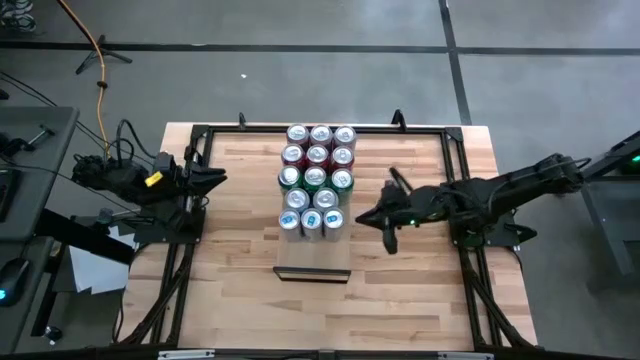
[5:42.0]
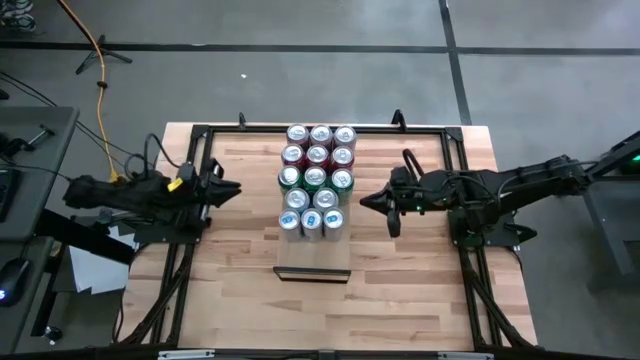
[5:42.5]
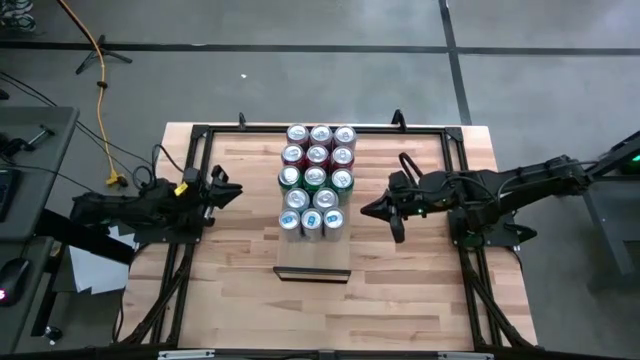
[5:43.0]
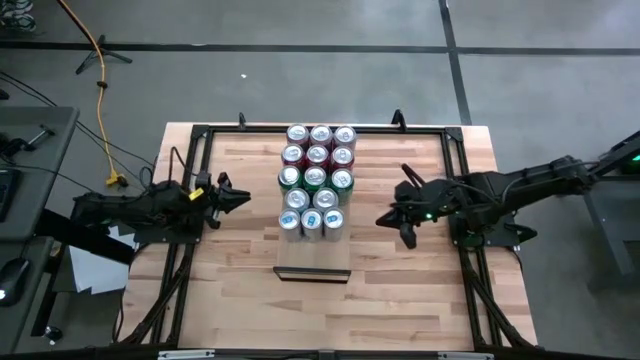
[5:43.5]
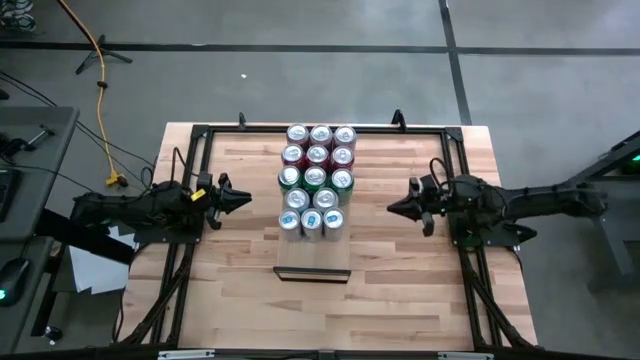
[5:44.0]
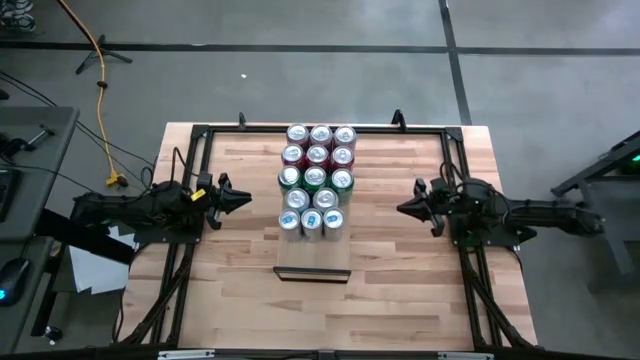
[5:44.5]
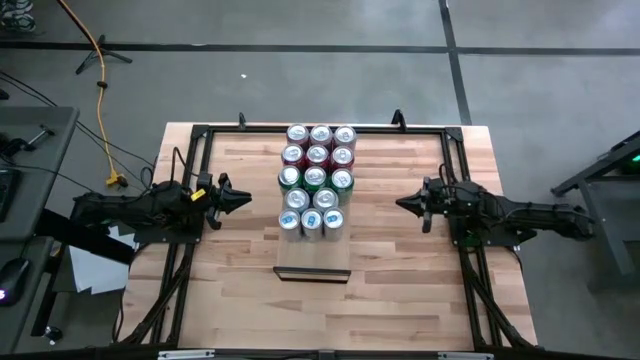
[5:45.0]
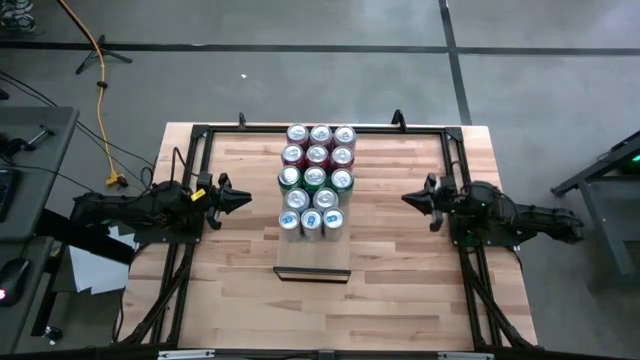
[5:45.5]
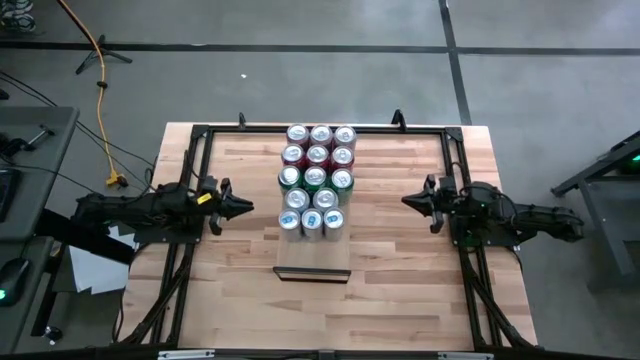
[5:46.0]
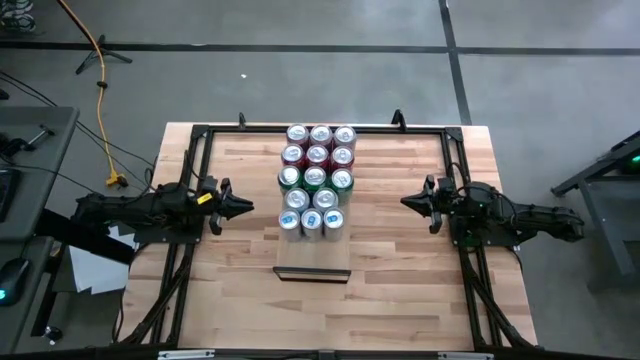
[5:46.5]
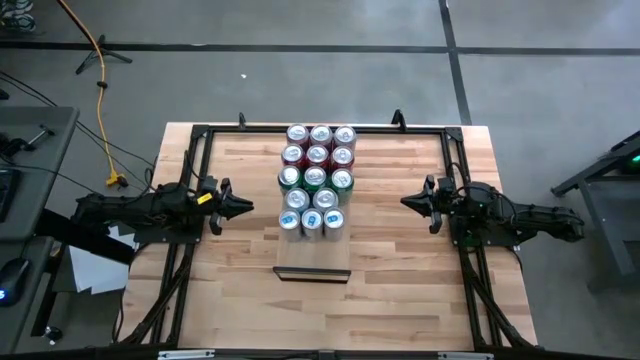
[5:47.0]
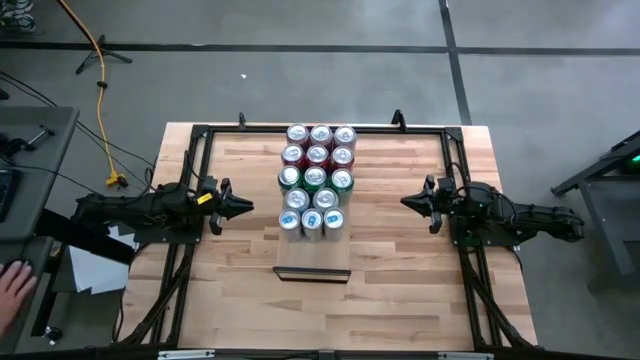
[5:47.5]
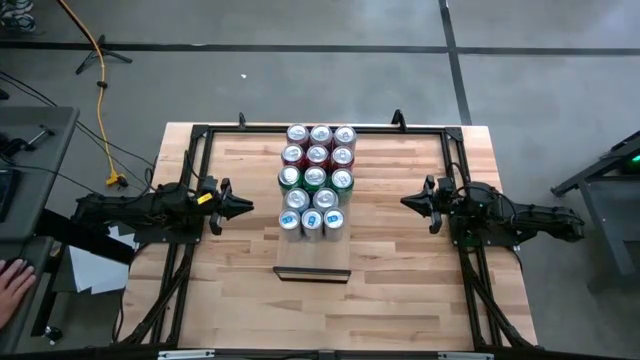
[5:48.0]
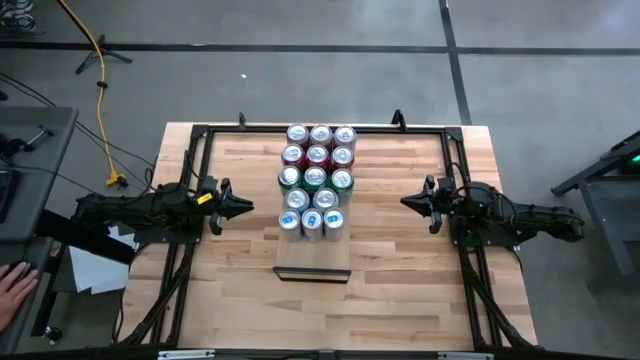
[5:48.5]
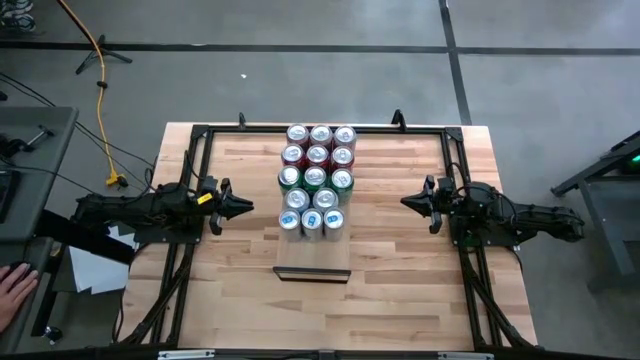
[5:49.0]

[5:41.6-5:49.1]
Task: Place canned beverage on shelf
Return to Home Position

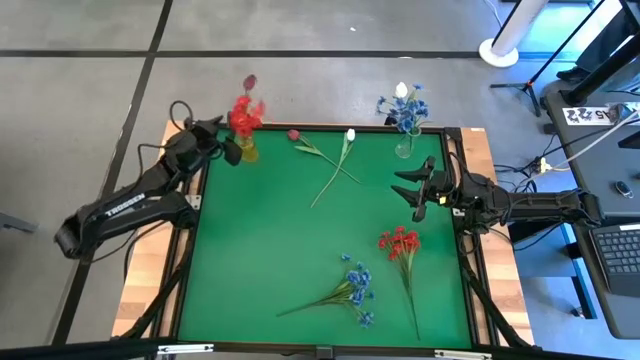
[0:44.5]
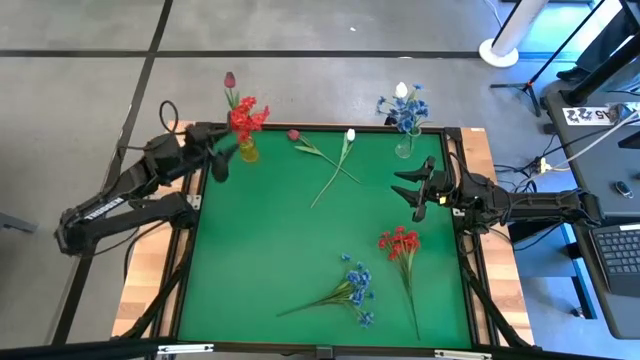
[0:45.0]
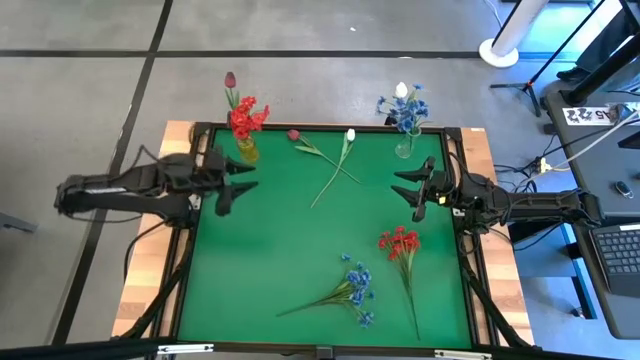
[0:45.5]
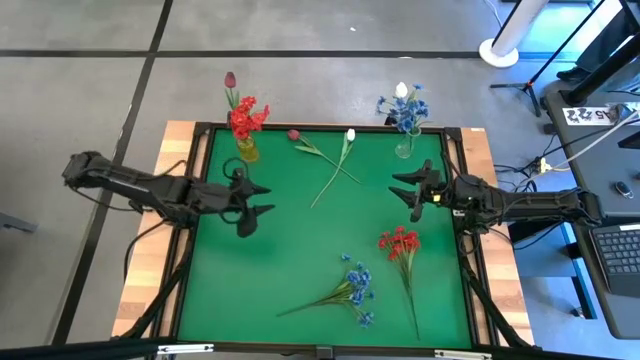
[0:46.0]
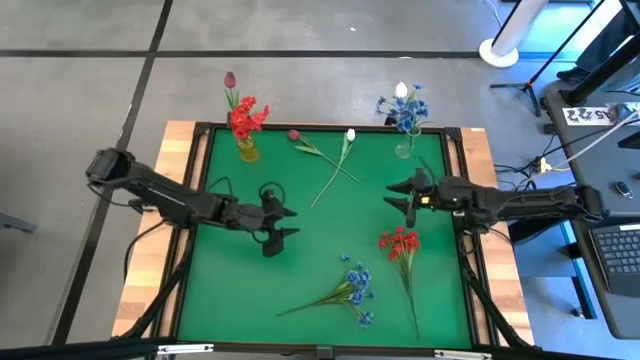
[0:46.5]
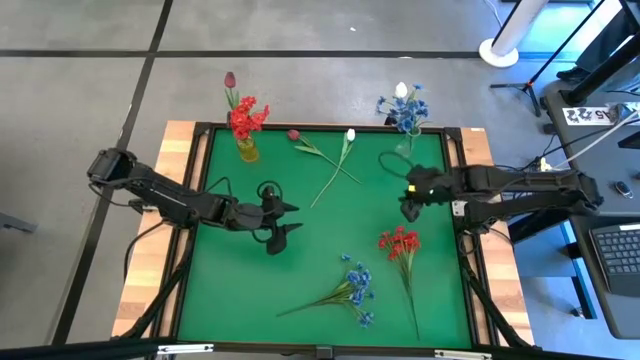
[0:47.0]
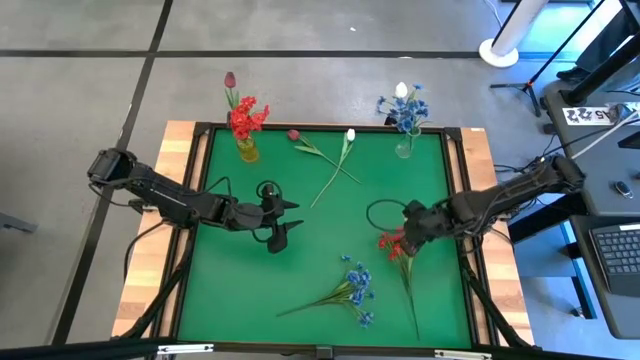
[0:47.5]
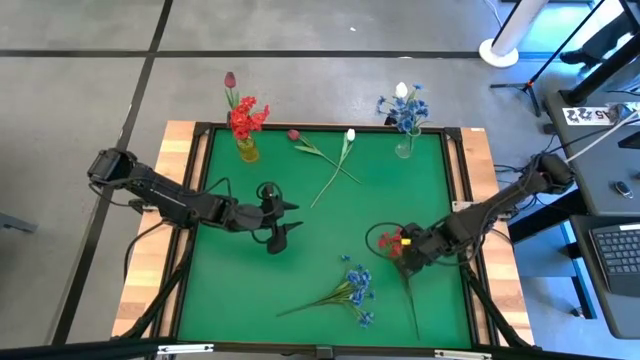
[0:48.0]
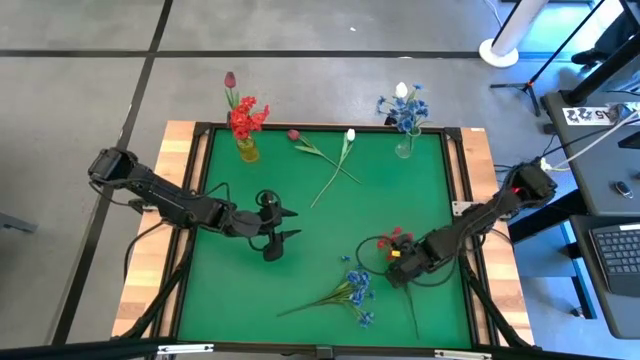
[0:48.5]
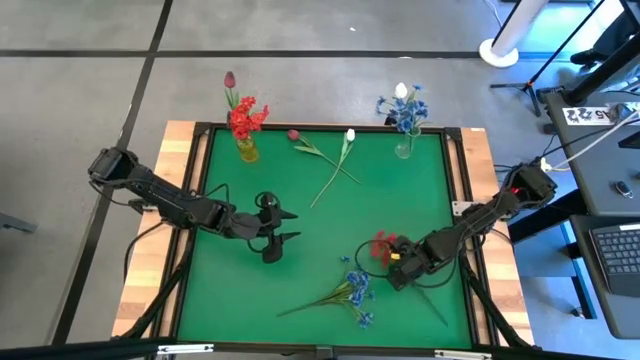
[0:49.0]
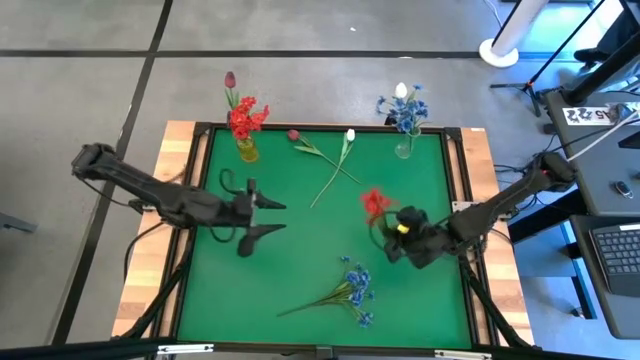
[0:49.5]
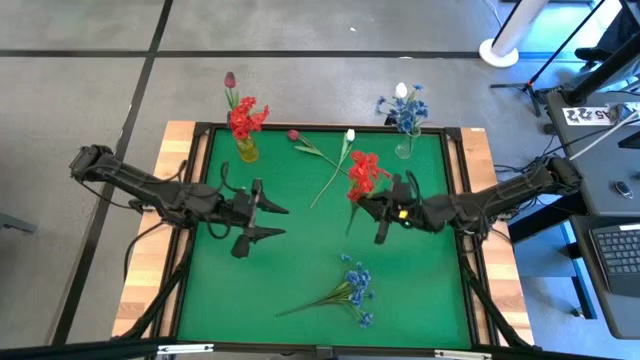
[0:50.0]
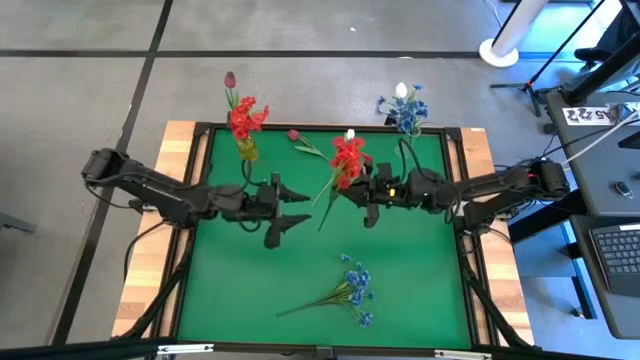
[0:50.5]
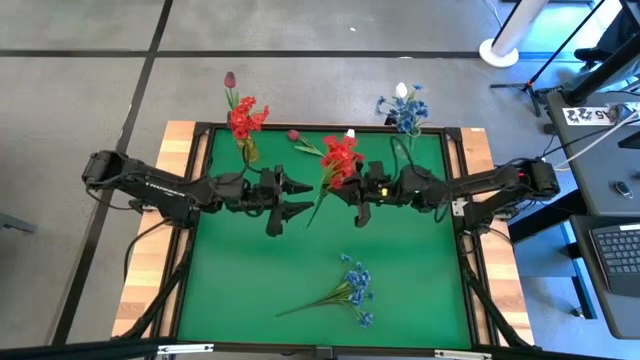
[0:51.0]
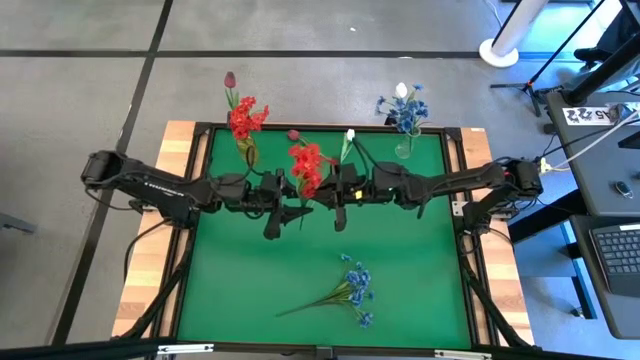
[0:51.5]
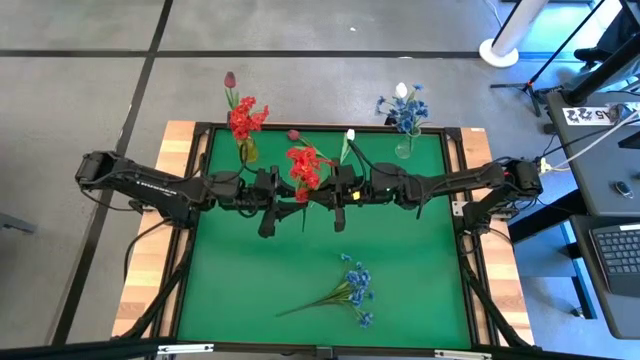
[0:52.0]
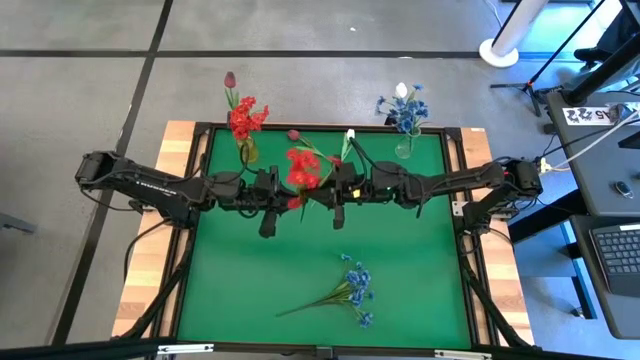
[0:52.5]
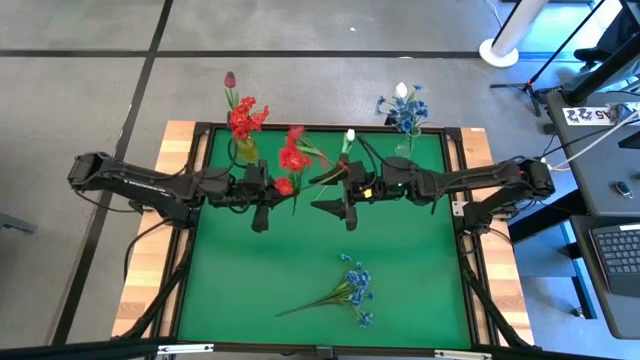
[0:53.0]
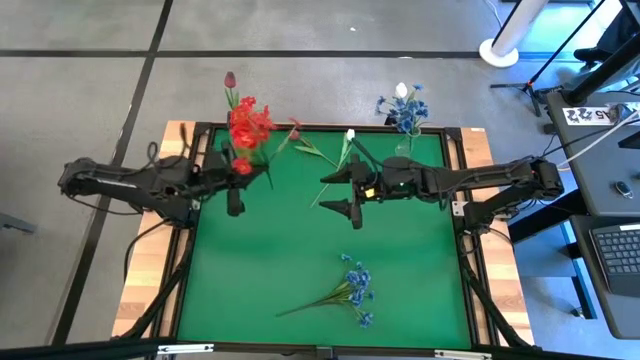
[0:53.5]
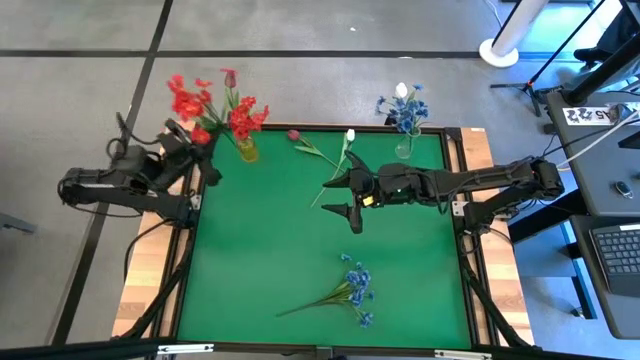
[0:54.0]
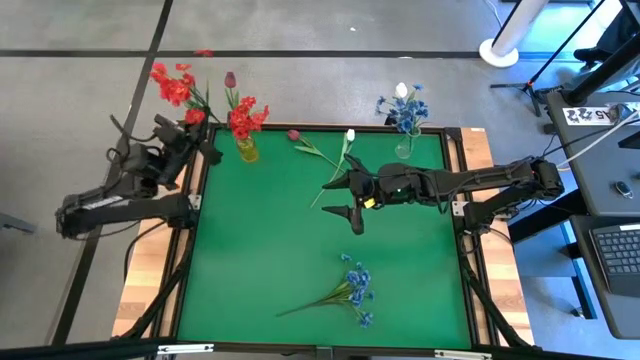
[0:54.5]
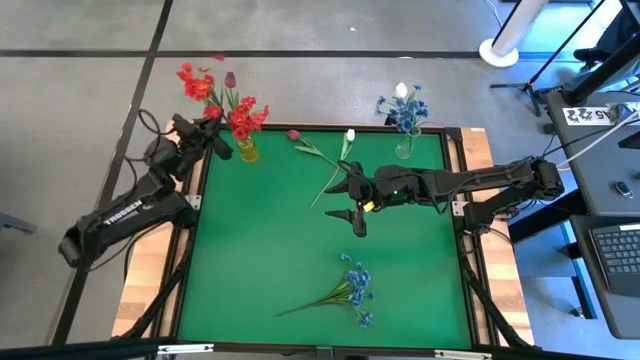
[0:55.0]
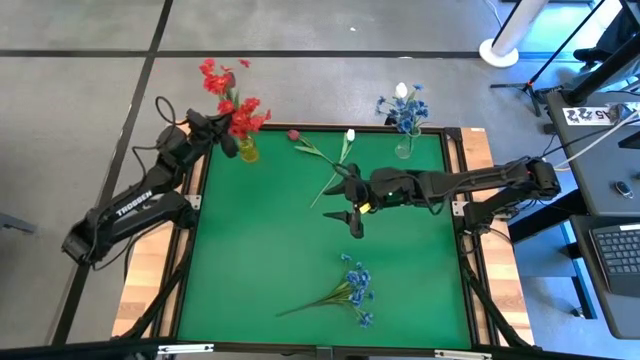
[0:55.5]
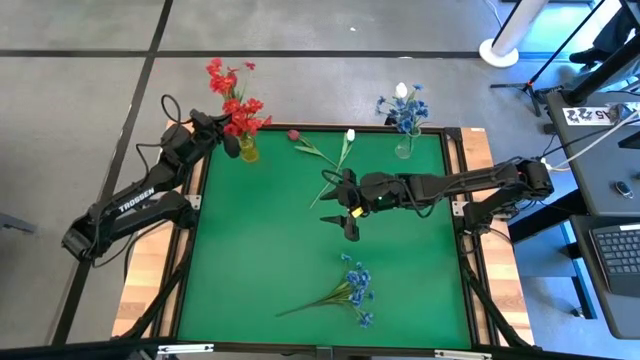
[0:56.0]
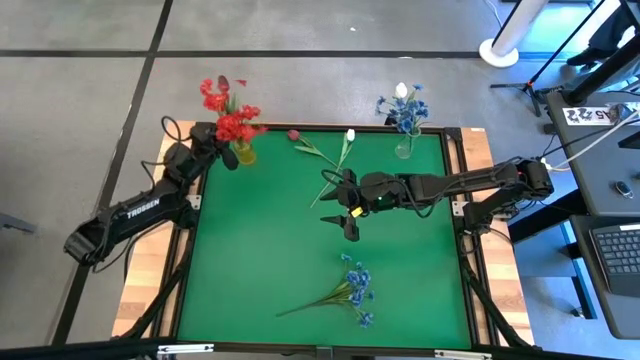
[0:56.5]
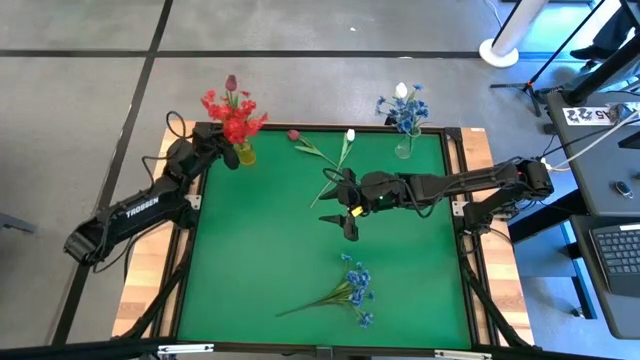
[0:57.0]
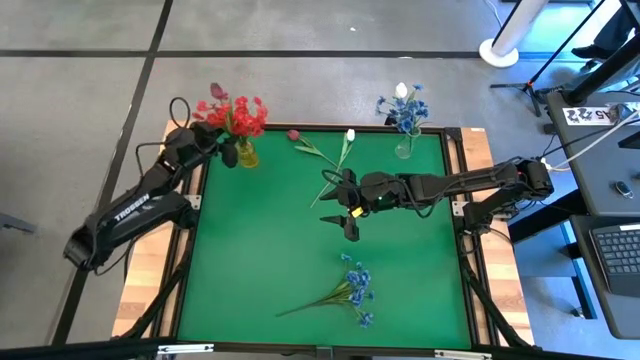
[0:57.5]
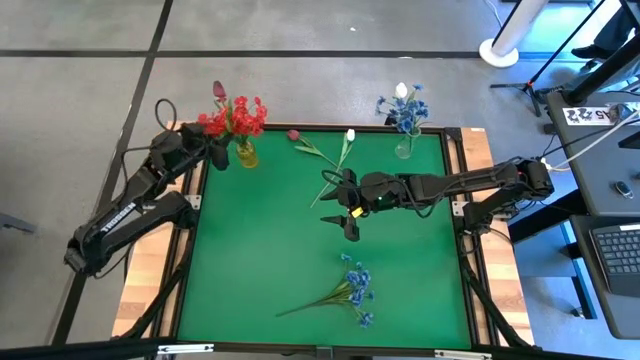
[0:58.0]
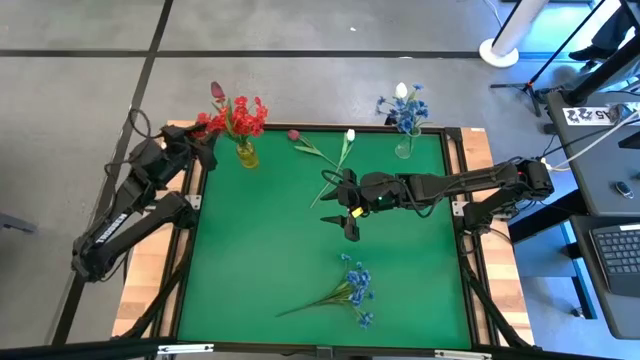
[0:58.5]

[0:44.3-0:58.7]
Task: Sort flowers into vase by color
Put the orange flowers into the yellow vase
